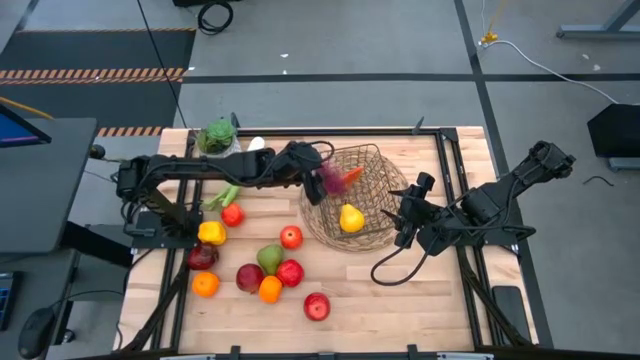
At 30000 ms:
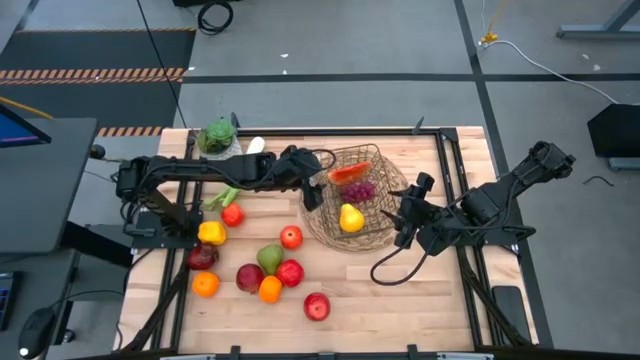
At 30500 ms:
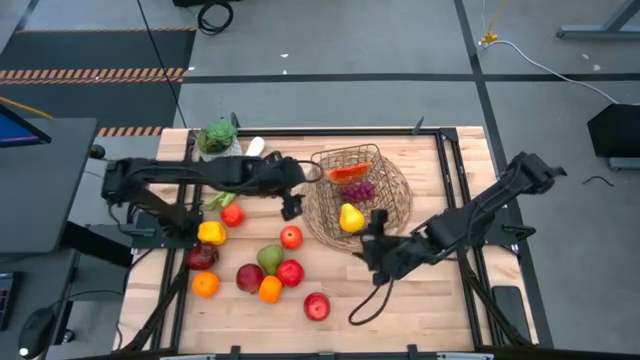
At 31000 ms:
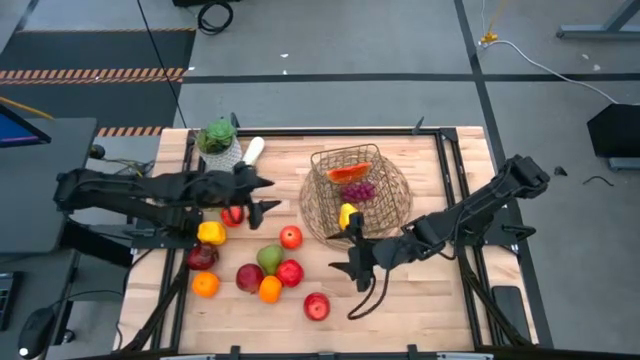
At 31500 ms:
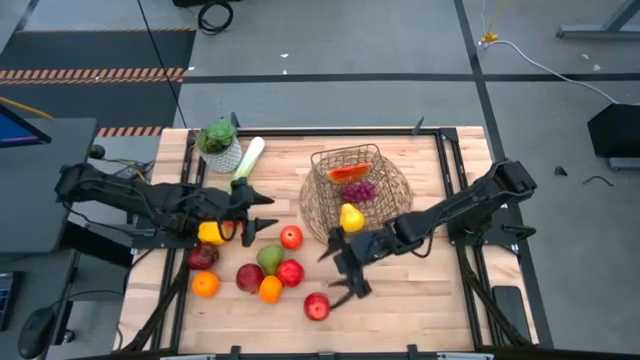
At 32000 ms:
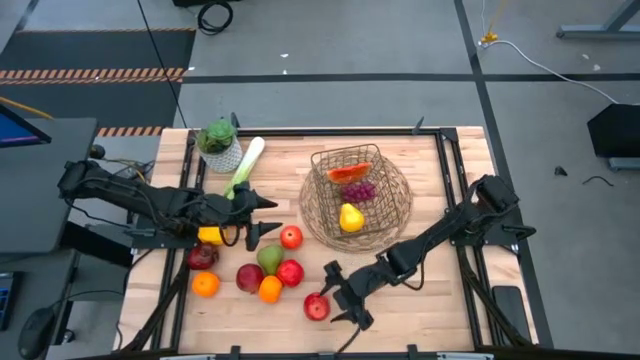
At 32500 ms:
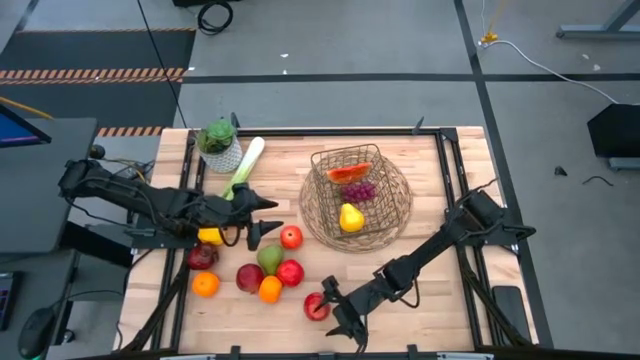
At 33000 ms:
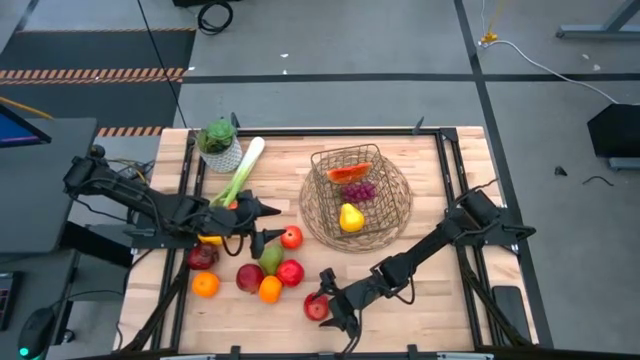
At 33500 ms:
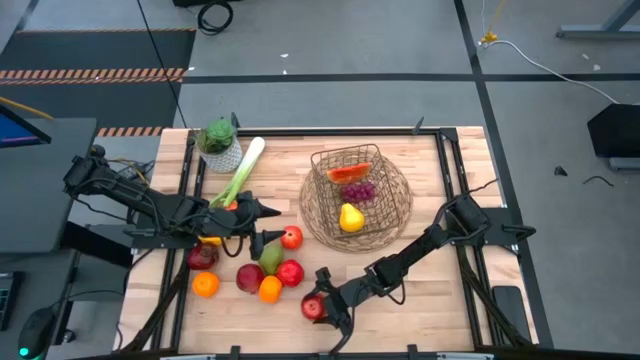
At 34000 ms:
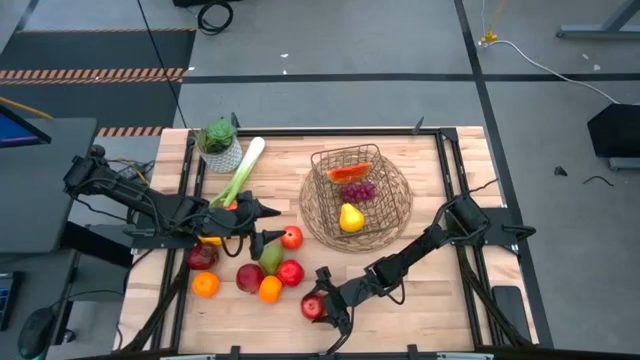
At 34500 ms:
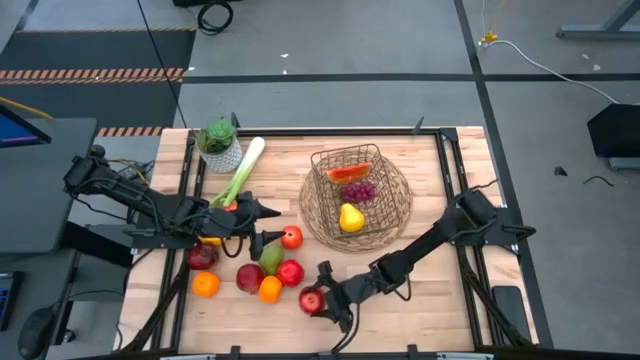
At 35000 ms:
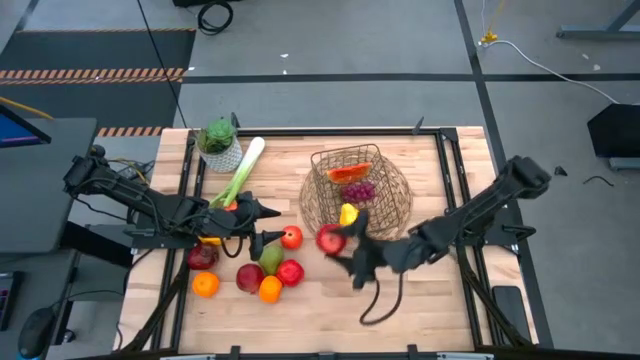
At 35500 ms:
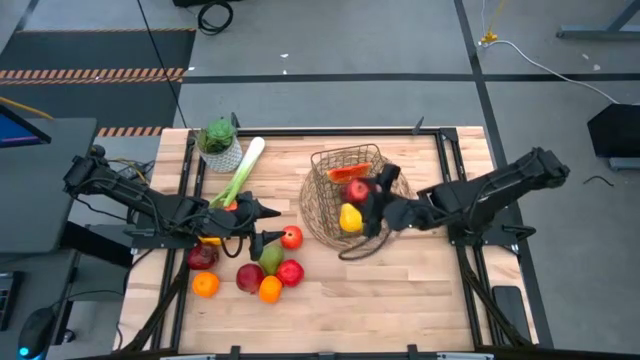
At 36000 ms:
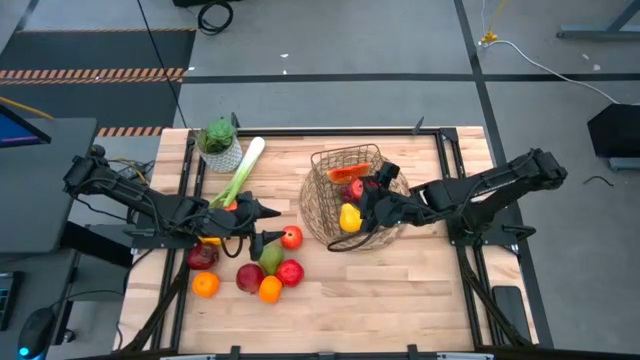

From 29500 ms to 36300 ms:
Task: Build produce basket
Put the bottom right red apple into the wire basket

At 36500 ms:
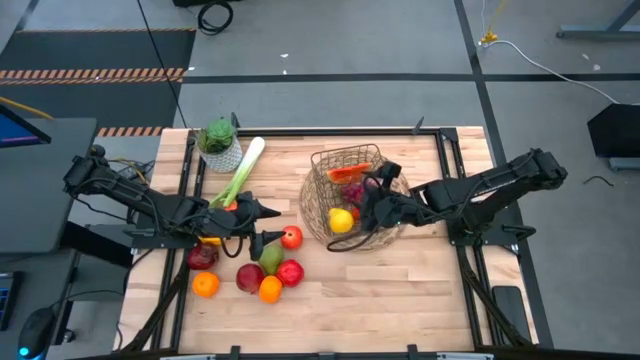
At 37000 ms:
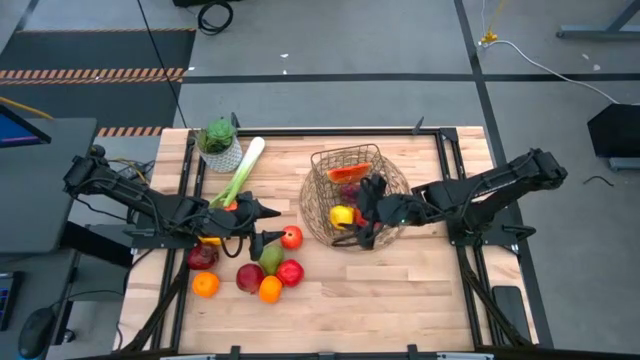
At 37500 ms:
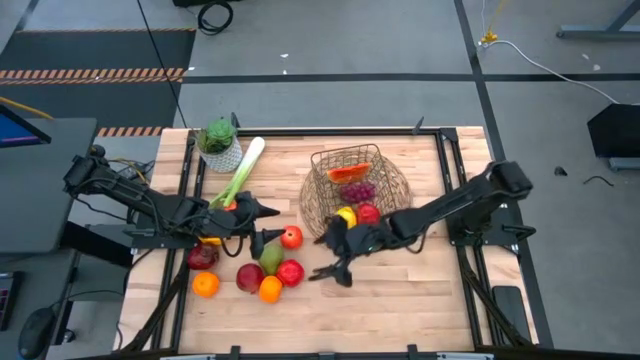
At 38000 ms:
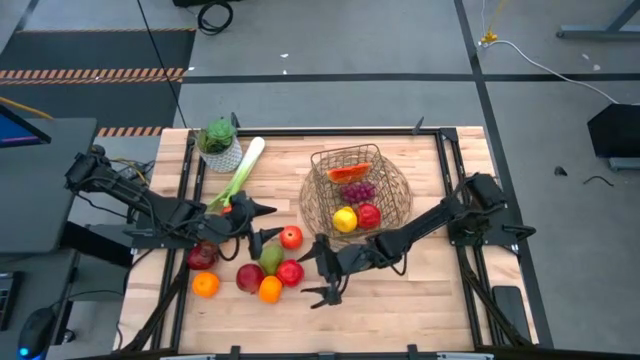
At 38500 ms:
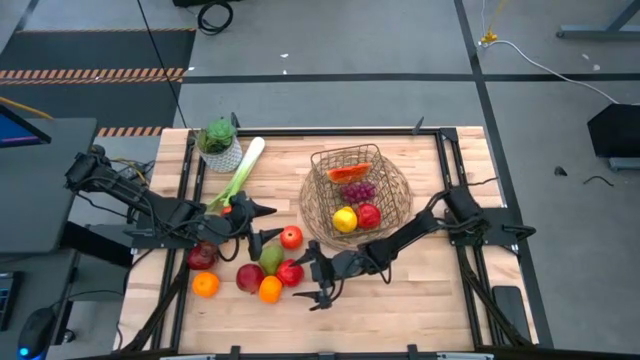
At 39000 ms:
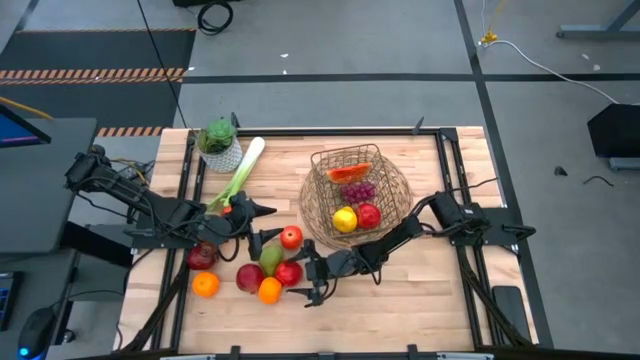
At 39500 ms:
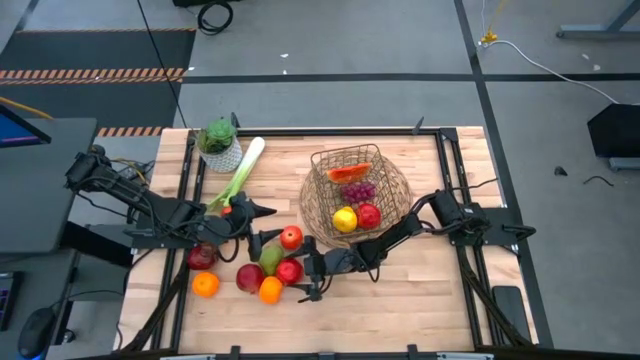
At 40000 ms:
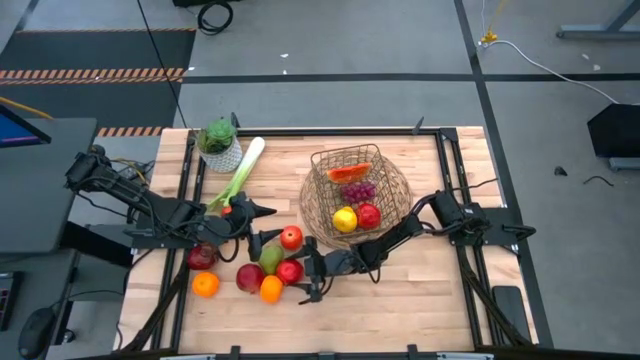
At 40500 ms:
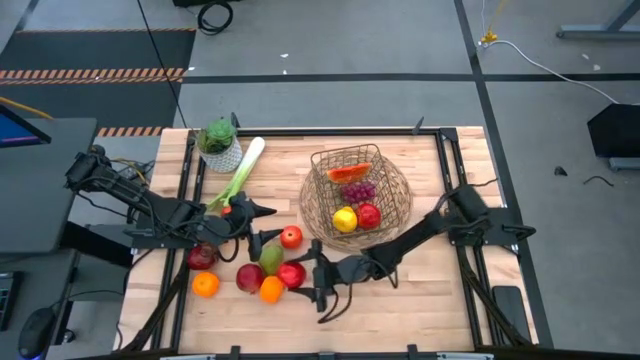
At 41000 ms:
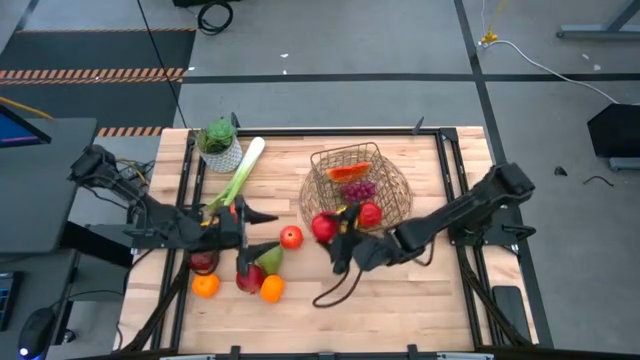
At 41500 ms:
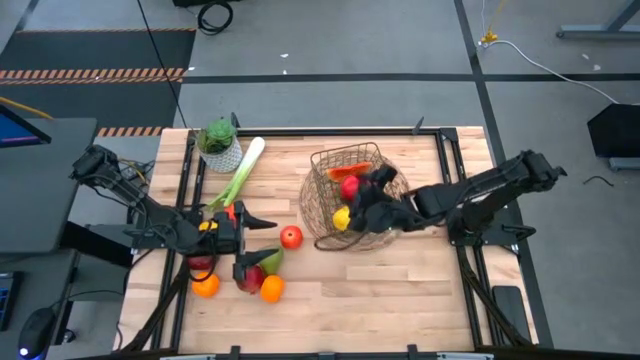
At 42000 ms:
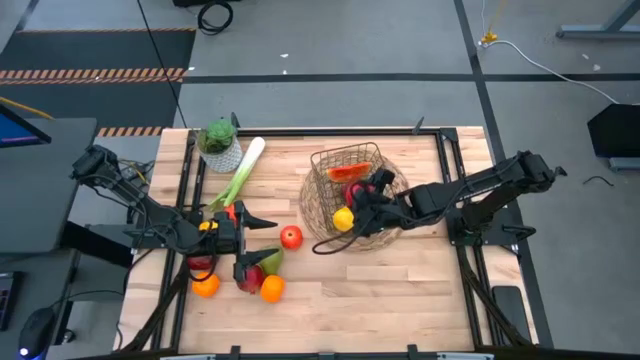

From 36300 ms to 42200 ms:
Put the bottom left red apple into the wire basket

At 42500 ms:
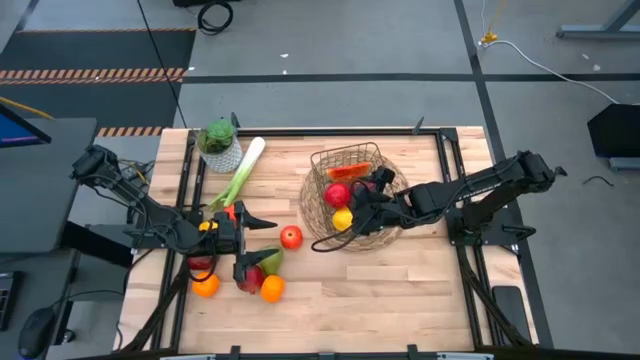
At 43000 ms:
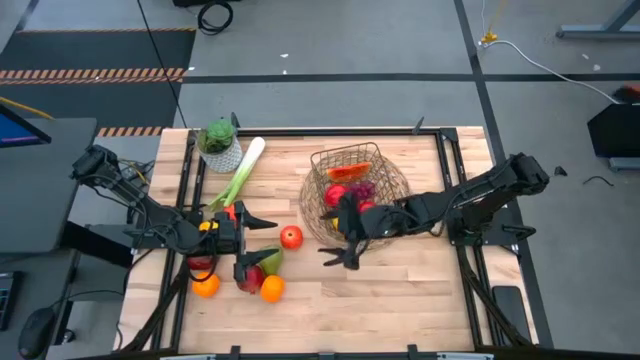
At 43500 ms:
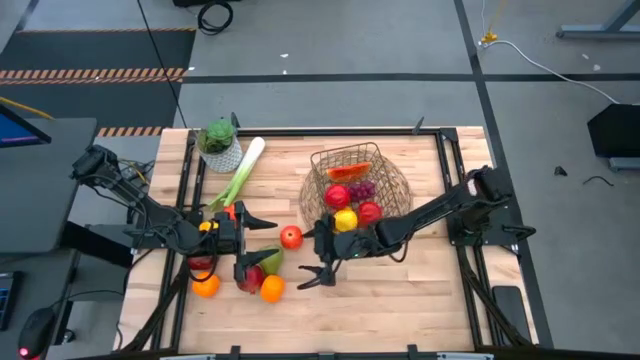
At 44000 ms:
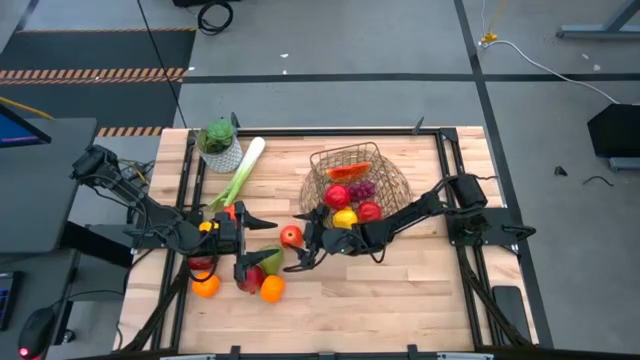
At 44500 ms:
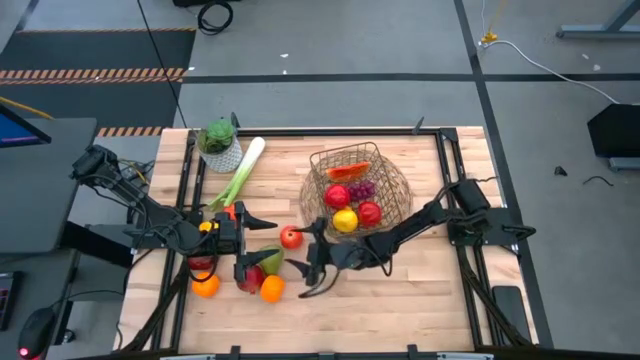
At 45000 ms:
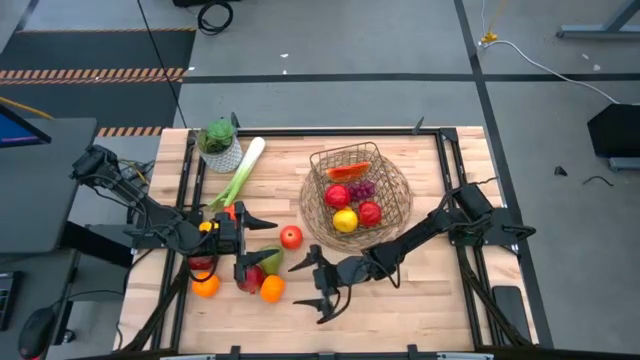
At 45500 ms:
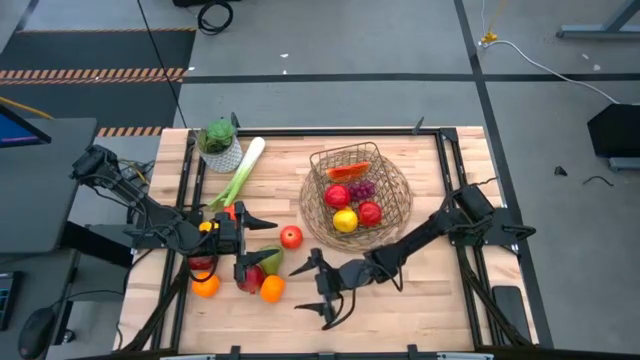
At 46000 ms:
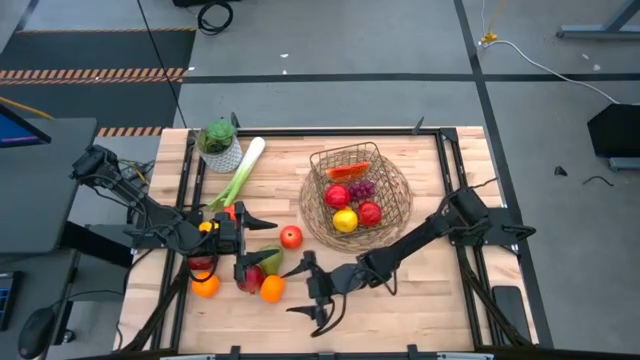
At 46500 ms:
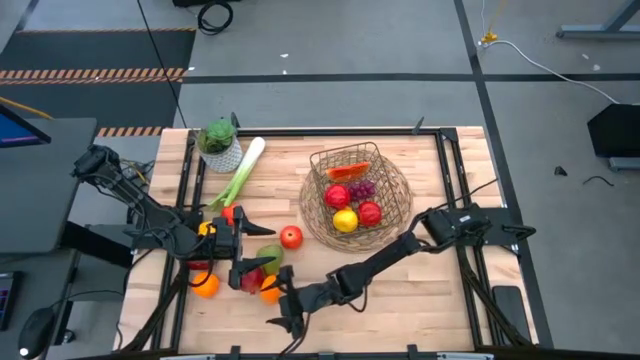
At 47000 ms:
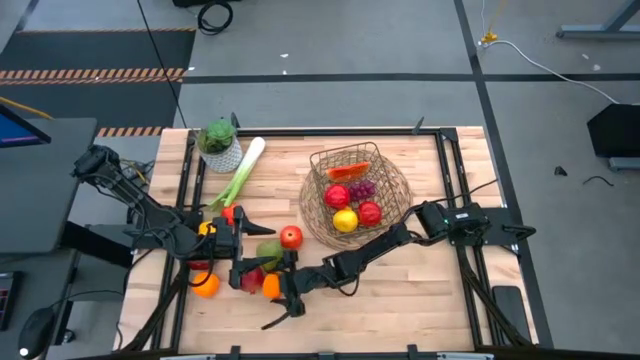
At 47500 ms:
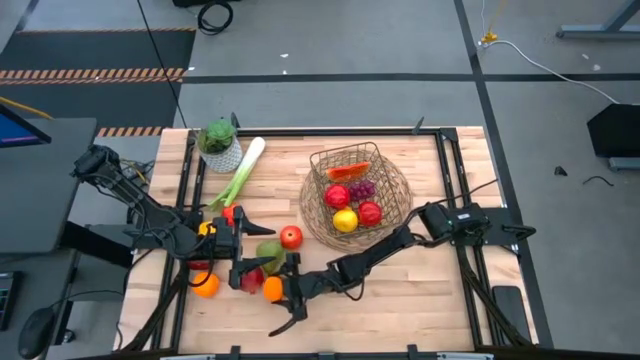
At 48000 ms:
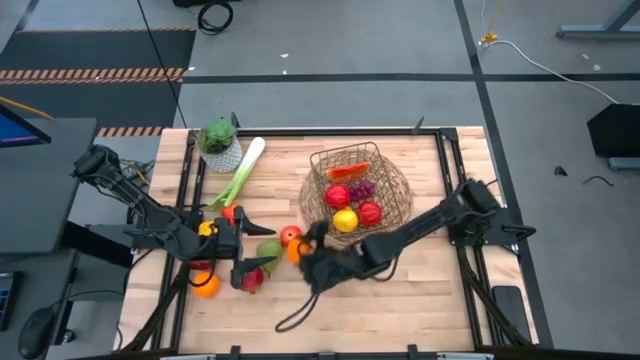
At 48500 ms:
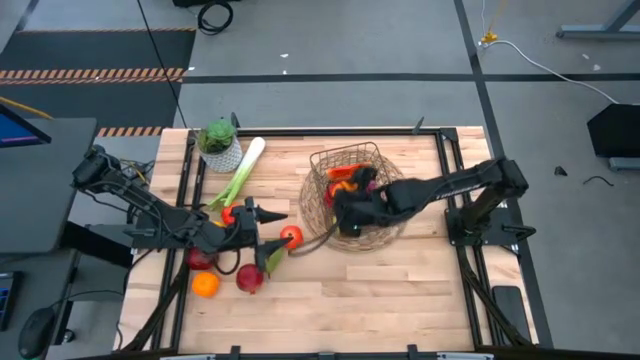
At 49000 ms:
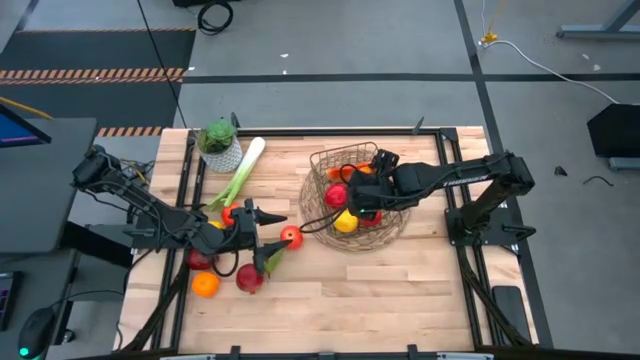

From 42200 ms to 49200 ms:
Put the right orange into the wire basket

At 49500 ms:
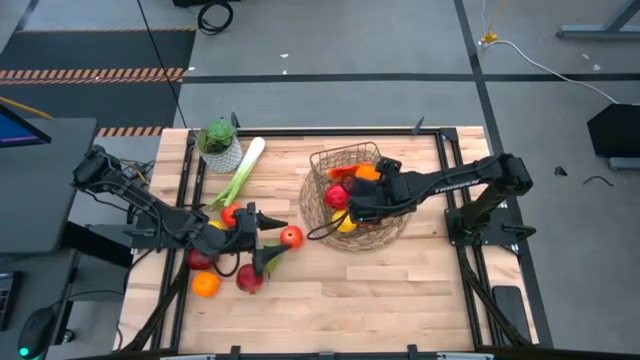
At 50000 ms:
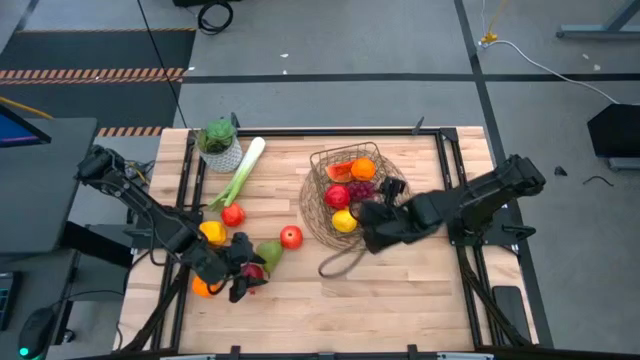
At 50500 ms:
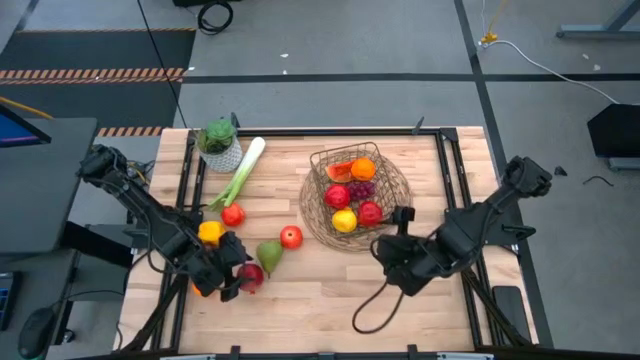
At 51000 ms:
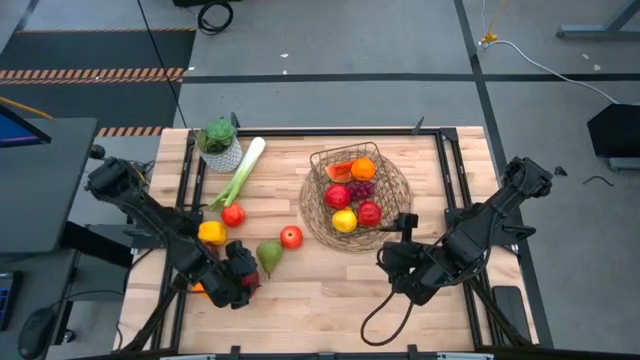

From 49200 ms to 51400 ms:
Put the red pomegranate into the wire basket
